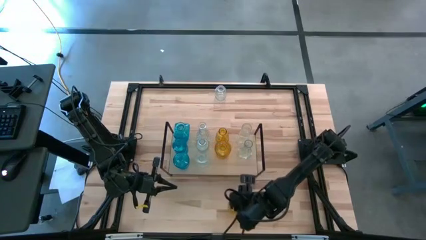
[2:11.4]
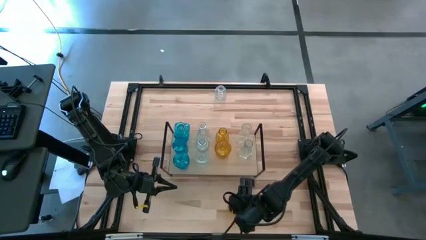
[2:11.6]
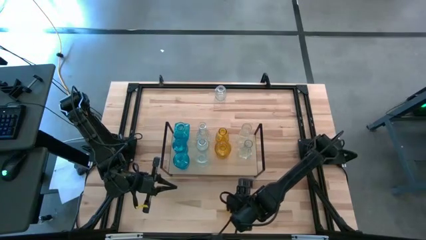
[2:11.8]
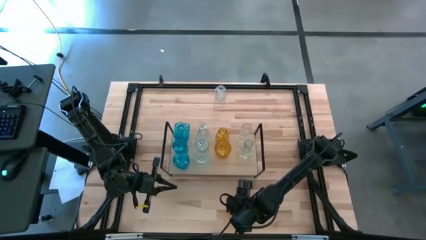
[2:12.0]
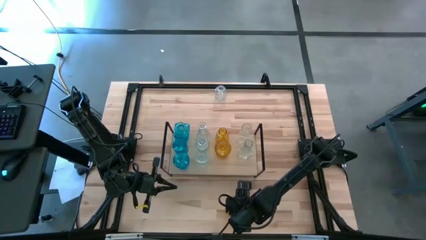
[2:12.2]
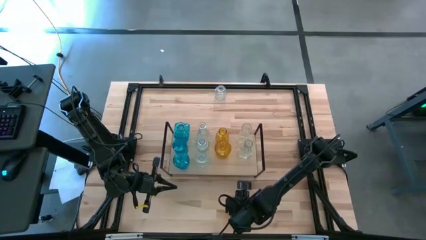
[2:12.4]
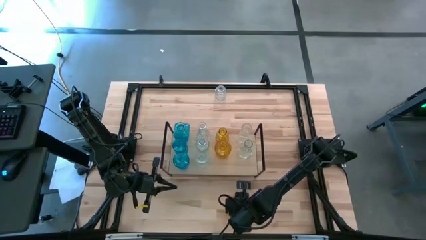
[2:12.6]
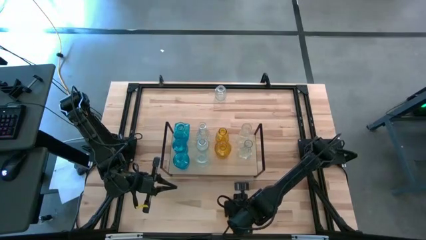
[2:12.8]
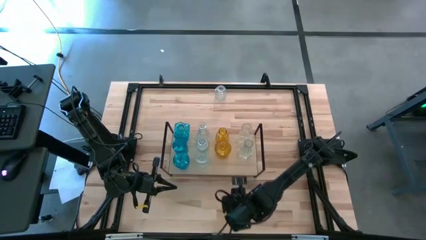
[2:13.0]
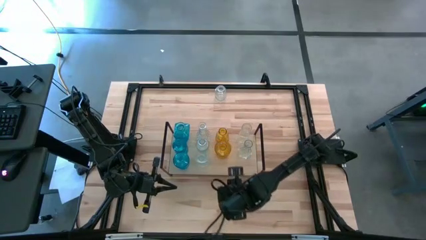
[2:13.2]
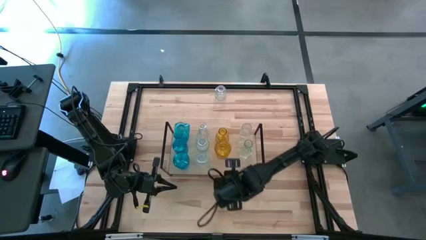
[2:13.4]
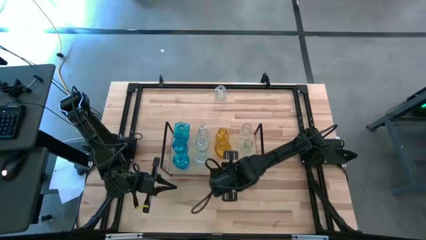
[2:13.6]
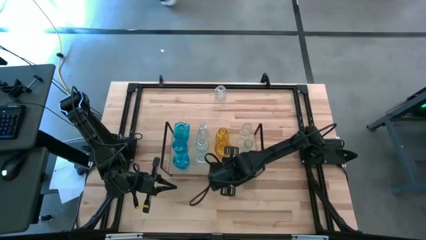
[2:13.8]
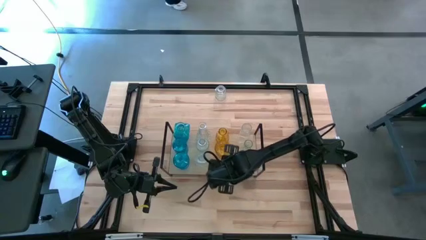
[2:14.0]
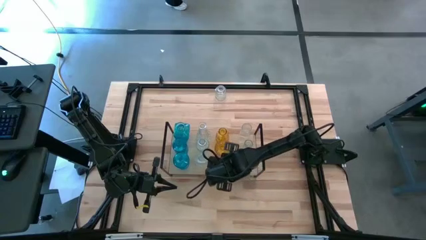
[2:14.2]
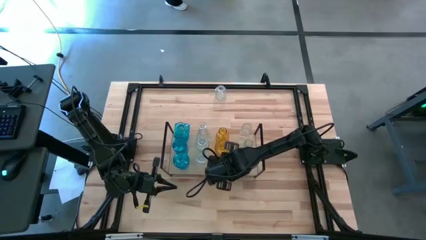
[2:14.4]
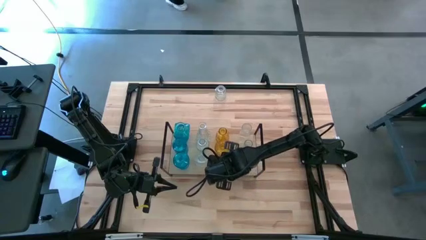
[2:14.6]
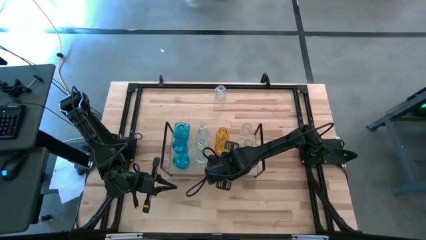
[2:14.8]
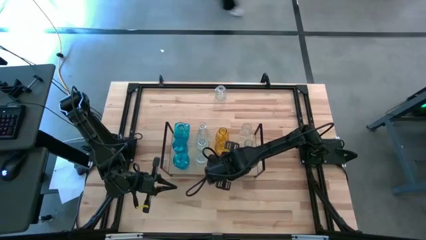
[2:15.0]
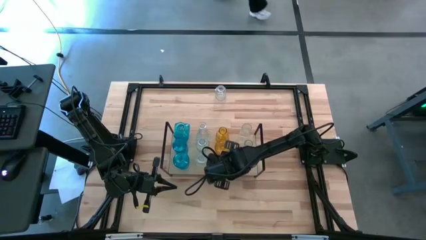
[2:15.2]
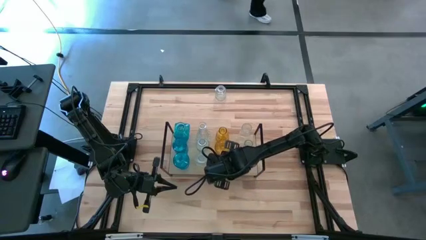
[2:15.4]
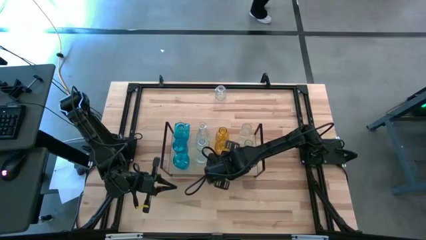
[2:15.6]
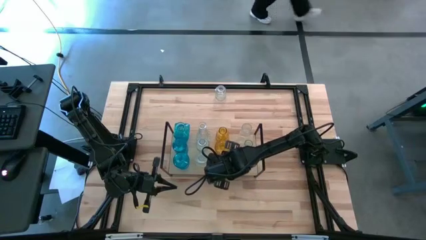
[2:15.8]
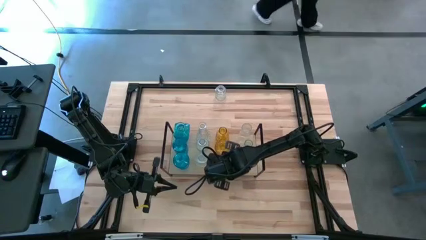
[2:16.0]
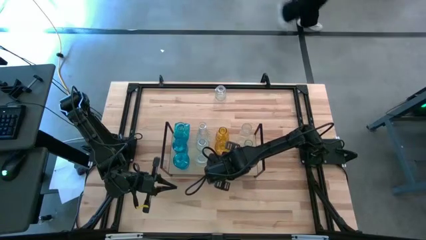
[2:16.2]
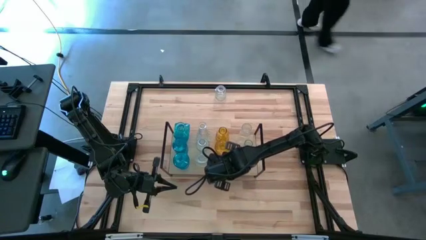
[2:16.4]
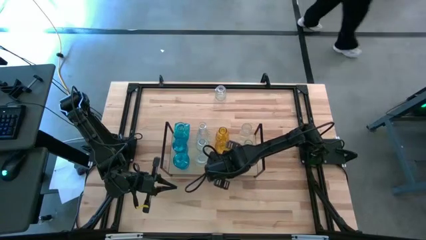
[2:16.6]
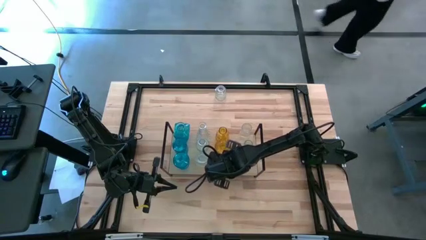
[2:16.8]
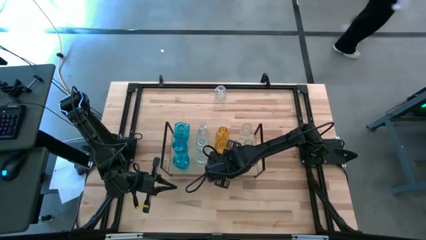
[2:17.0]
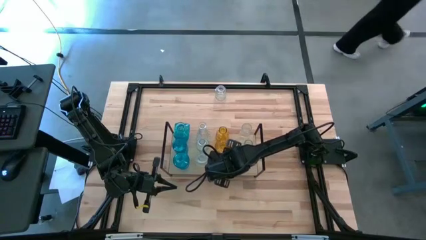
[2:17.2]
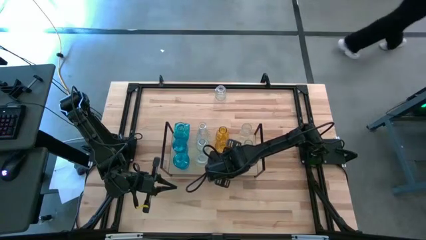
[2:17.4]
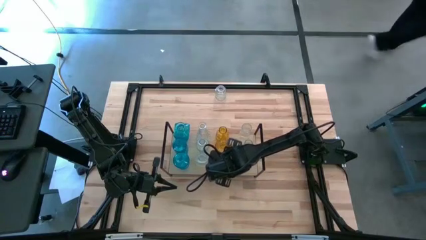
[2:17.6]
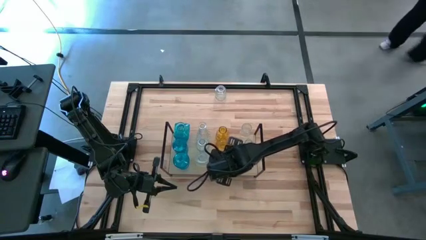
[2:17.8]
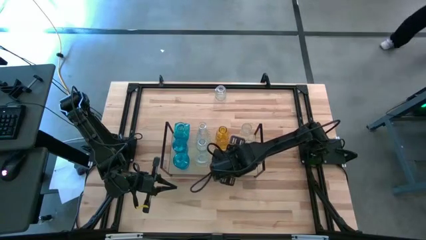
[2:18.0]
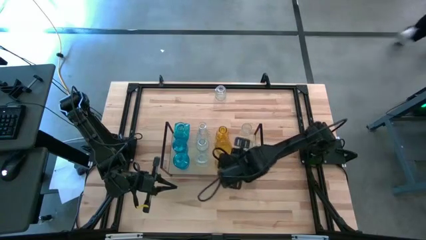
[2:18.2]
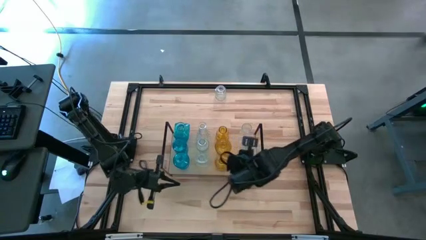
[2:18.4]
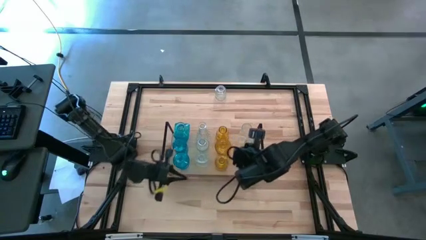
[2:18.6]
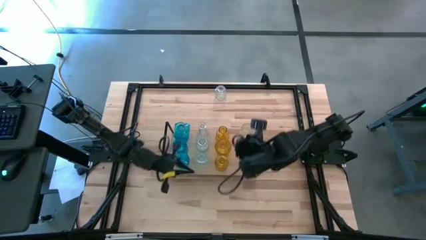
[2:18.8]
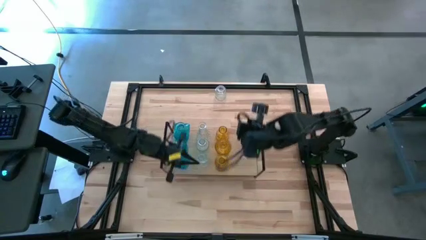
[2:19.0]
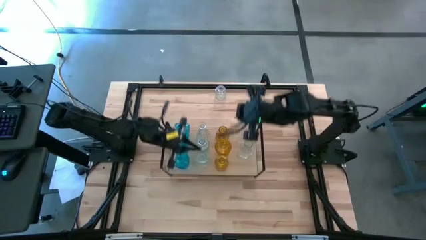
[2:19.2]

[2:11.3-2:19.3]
Task: sort vases onto shelf
Put the yellow vase on the shelf

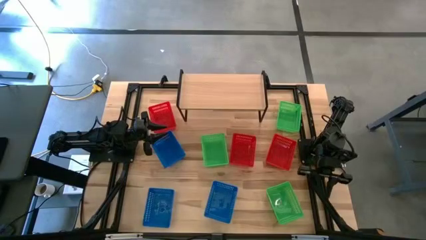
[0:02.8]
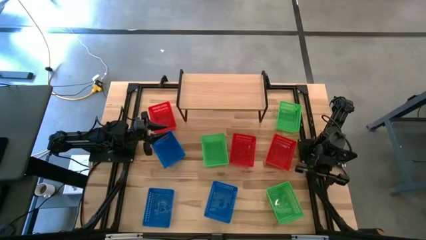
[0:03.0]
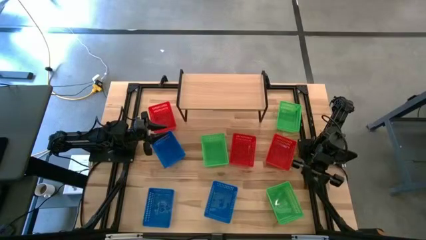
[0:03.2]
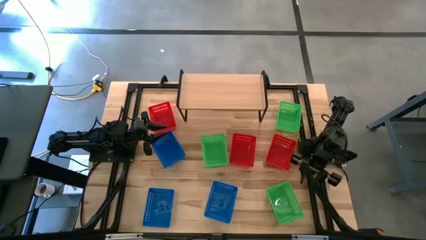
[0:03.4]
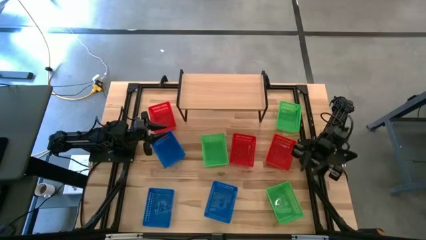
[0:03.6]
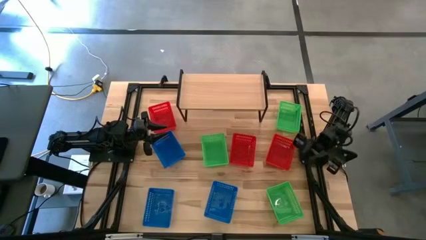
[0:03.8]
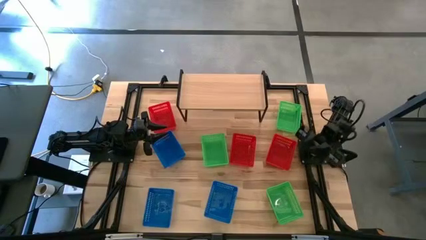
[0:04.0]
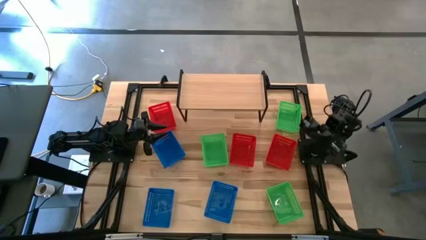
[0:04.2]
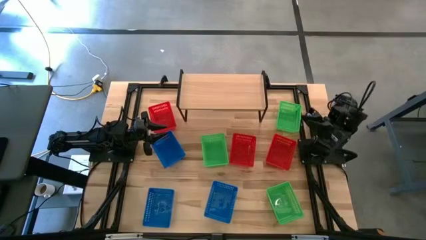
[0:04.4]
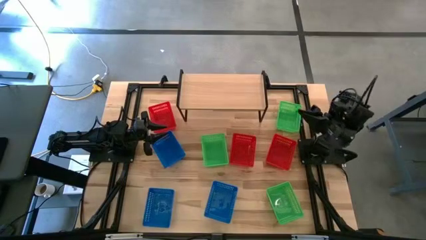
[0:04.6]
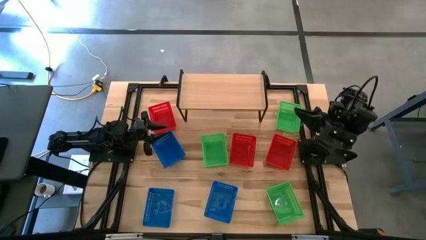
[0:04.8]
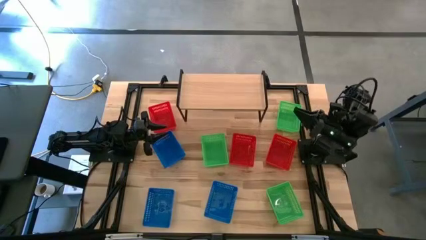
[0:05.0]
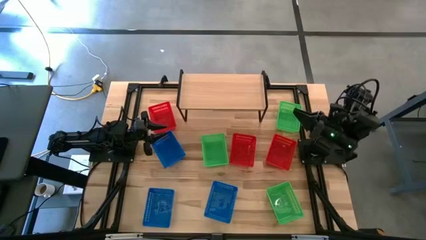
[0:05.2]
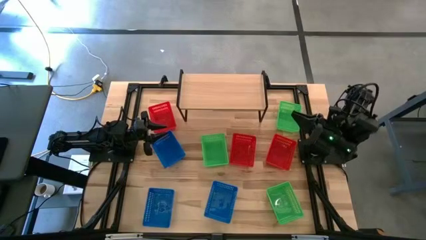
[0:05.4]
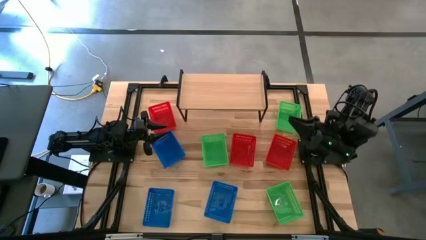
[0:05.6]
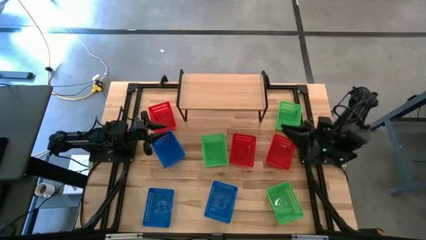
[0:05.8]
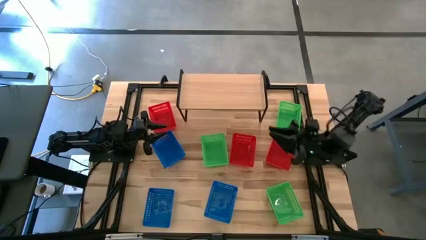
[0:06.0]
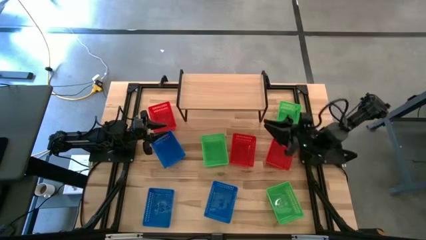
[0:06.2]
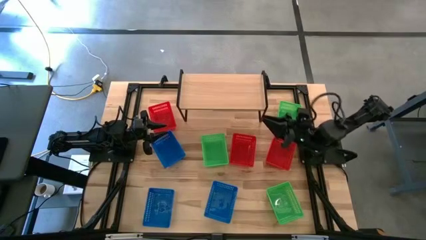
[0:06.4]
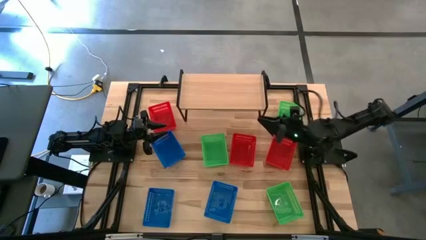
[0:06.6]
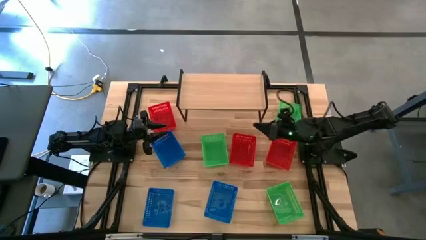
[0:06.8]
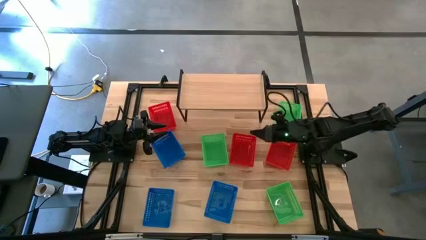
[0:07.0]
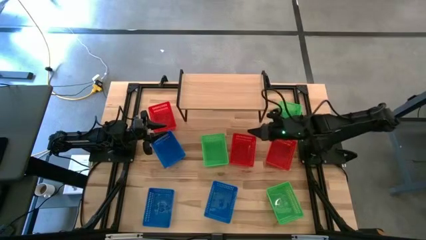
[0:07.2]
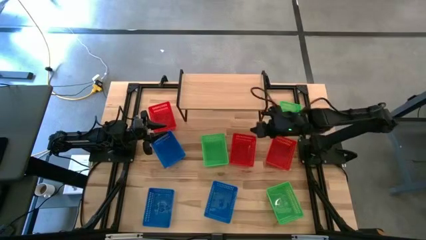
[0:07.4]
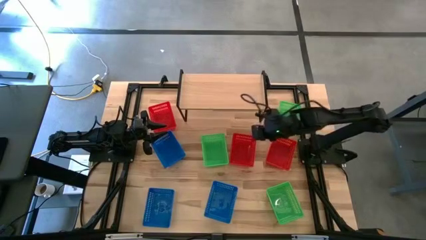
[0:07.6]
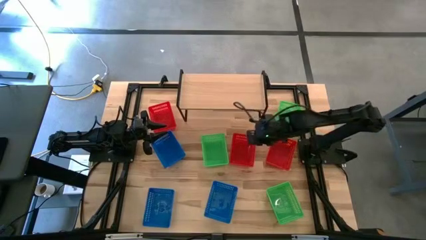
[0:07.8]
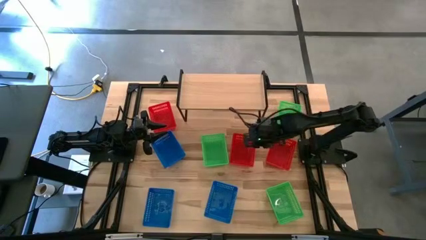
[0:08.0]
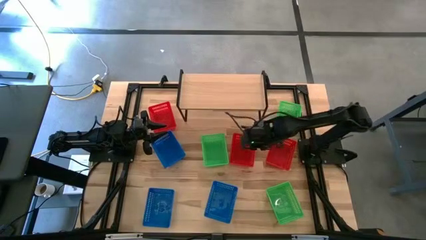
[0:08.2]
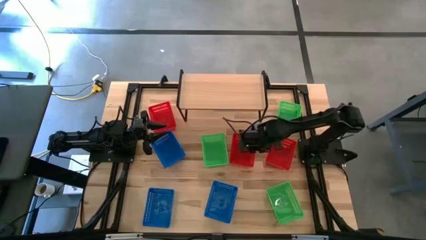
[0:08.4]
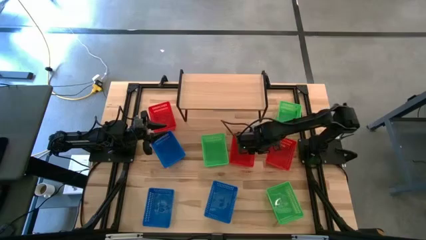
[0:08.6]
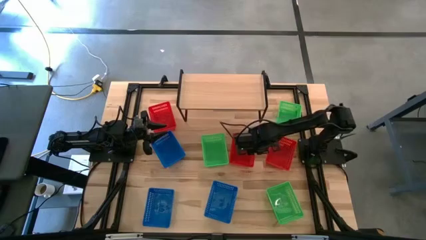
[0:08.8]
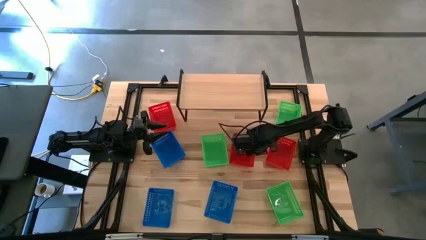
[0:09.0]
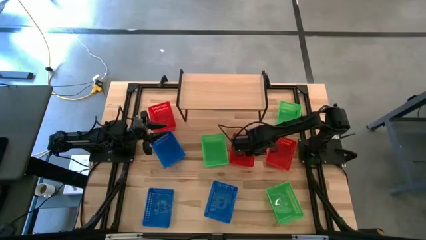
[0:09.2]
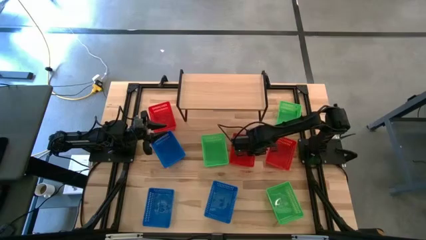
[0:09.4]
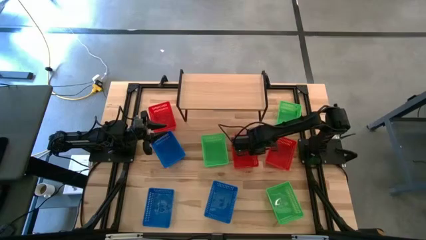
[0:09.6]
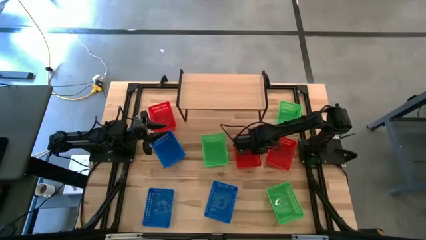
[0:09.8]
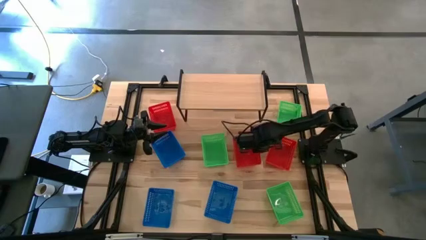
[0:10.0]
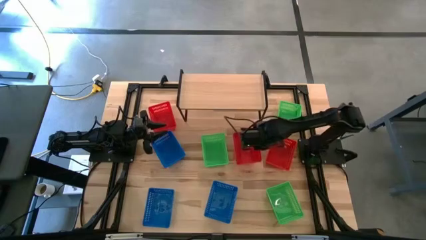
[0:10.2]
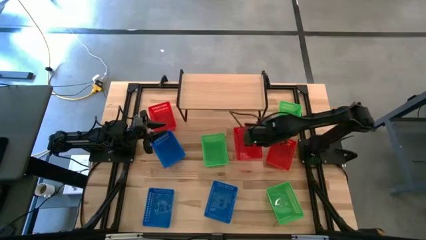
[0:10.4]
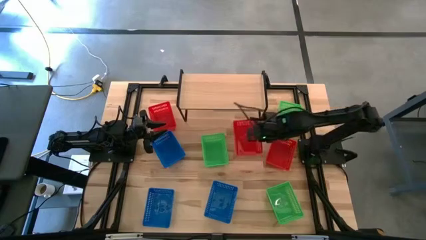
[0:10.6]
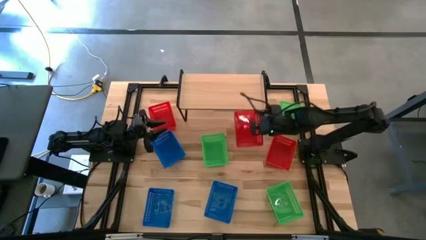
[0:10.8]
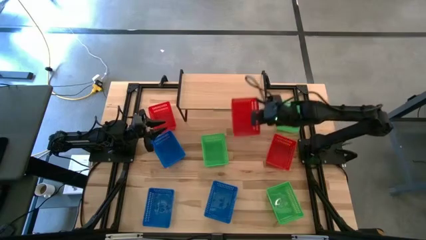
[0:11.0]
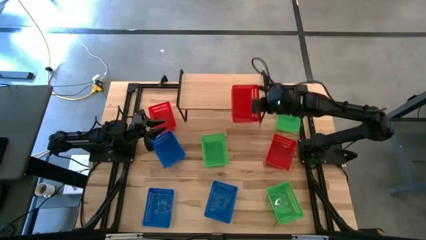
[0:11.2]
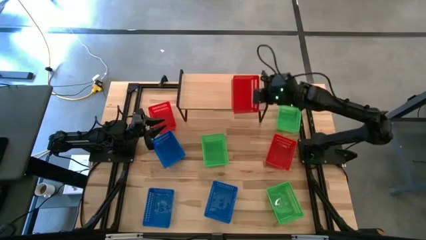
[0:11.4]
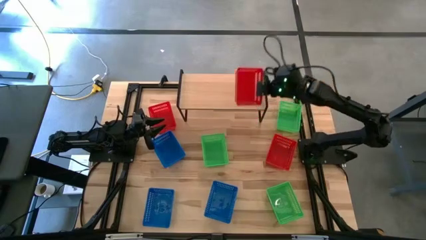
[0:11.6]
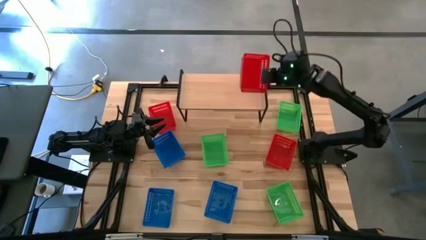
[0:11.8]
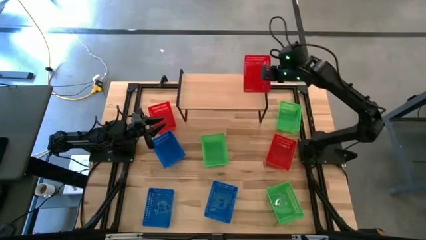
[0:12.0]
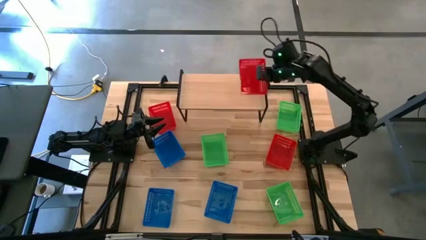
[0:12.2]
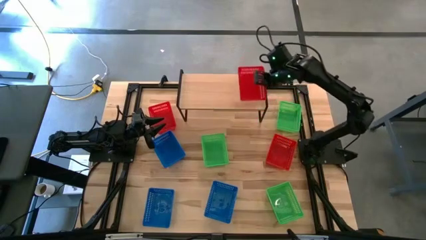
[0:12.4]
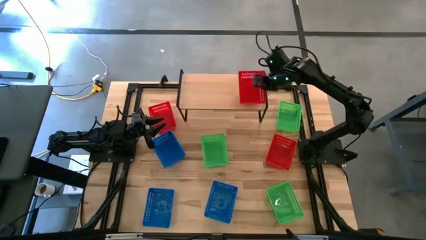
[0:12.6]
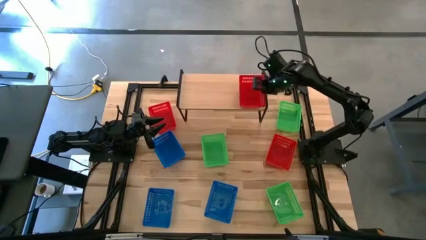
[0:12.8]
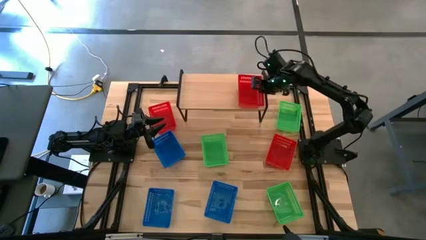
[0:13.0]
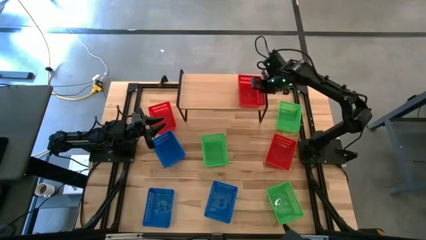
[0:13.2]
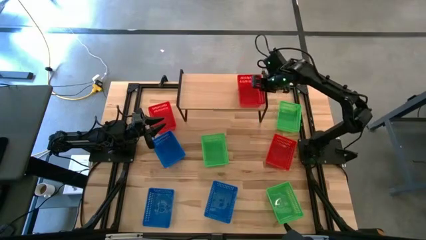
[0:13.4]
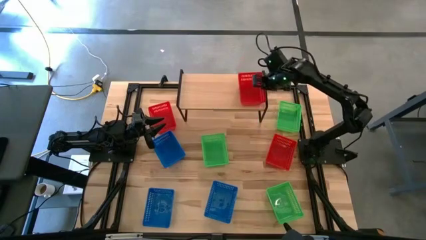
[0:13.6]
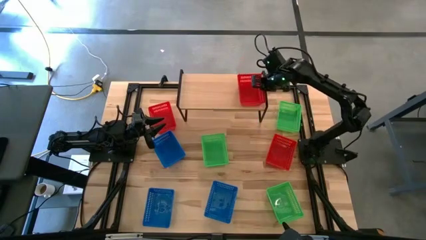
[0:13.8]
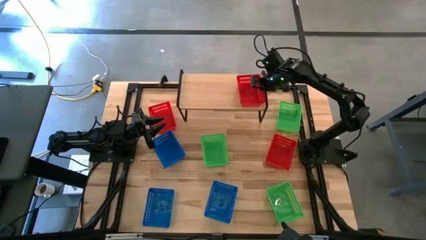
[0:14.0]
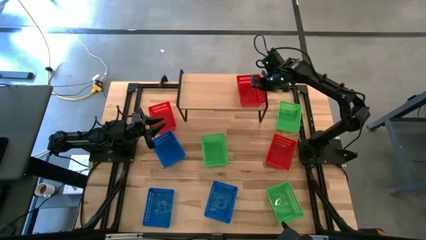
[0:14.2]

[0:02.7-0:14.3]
Task: Stack baskets on shelf by color
Put the middle red bin on the shelf
